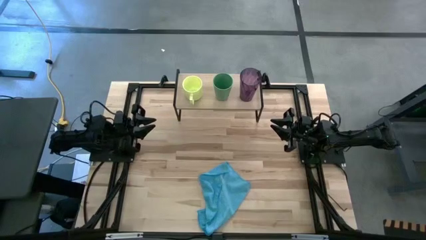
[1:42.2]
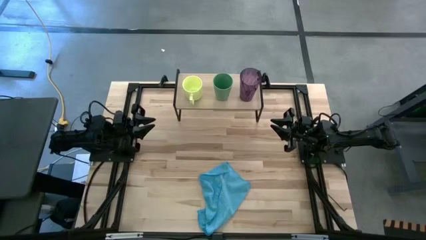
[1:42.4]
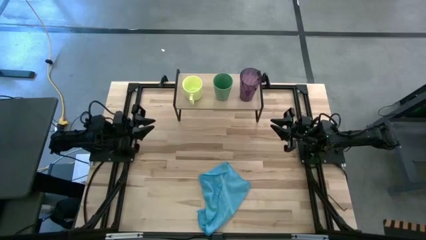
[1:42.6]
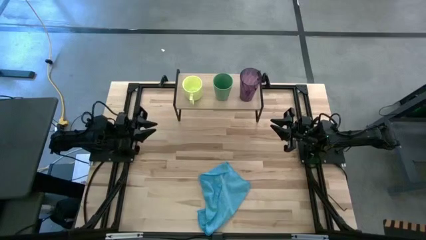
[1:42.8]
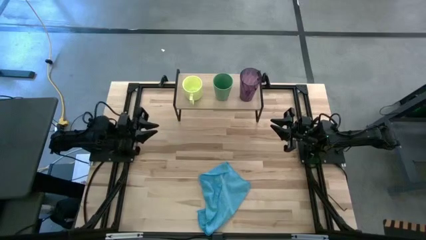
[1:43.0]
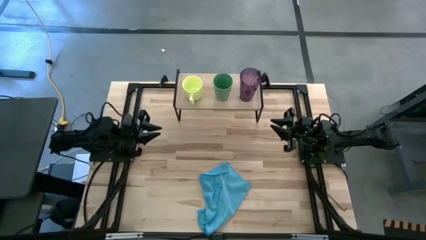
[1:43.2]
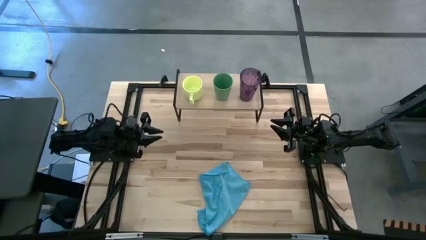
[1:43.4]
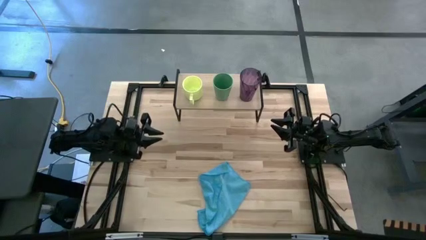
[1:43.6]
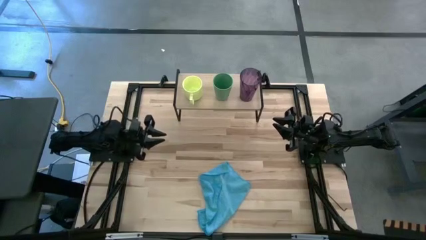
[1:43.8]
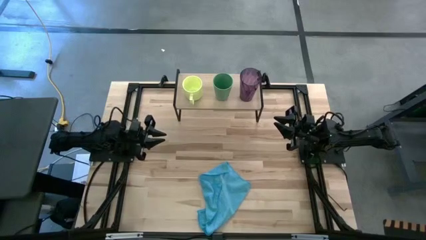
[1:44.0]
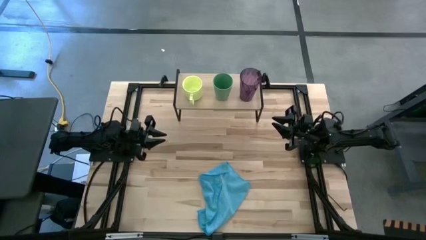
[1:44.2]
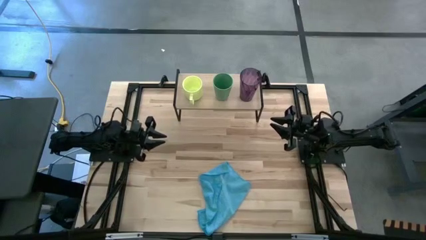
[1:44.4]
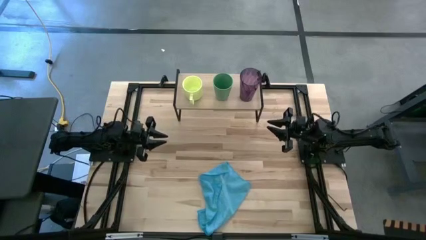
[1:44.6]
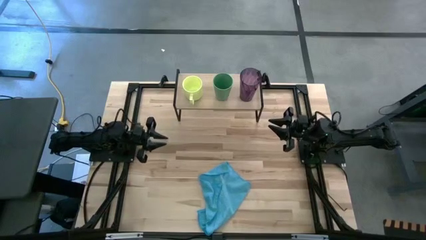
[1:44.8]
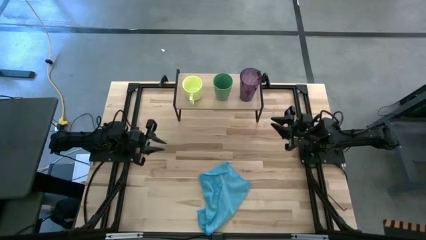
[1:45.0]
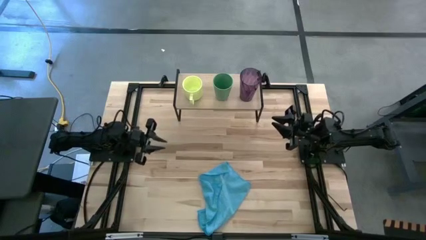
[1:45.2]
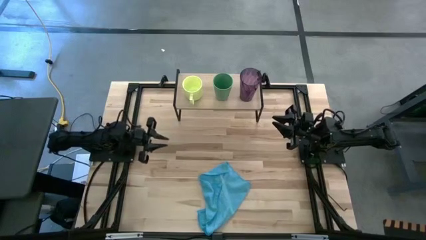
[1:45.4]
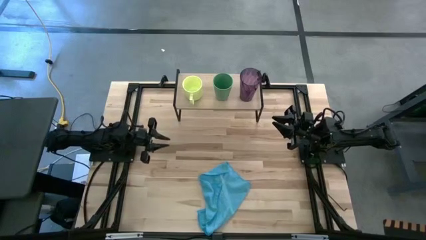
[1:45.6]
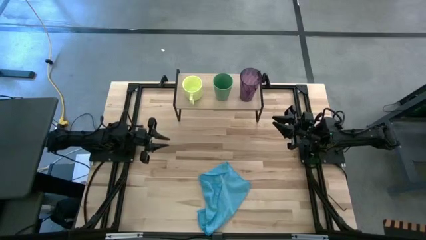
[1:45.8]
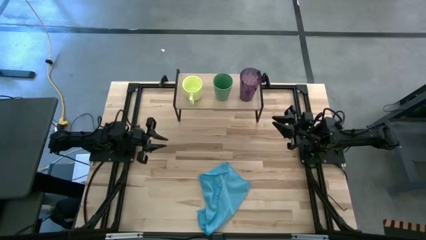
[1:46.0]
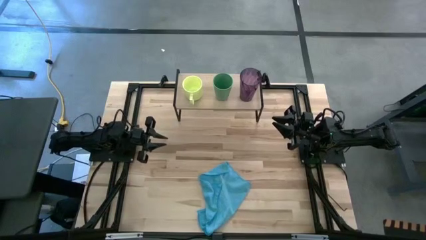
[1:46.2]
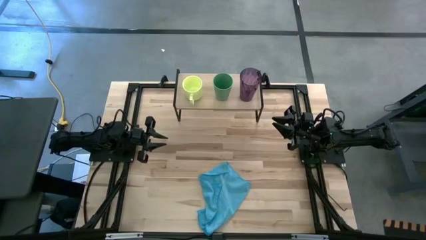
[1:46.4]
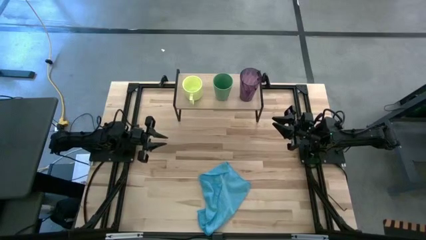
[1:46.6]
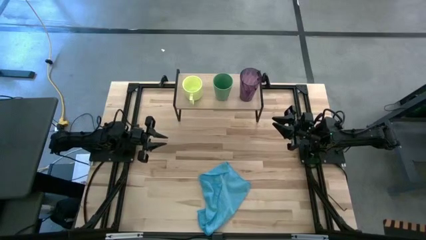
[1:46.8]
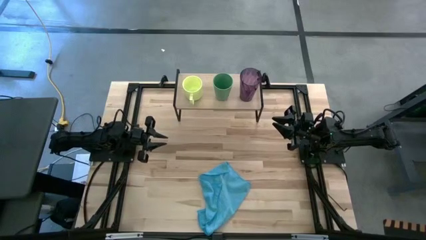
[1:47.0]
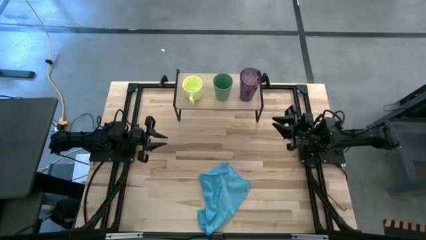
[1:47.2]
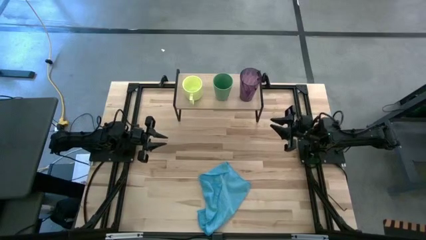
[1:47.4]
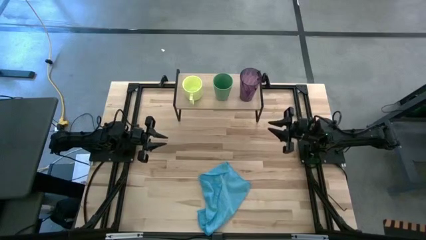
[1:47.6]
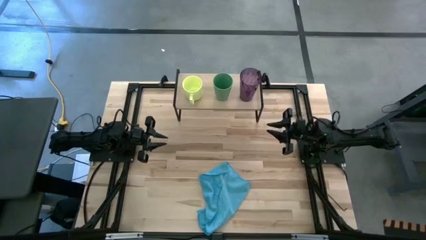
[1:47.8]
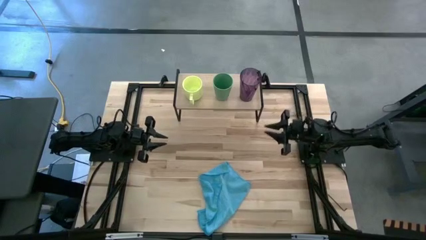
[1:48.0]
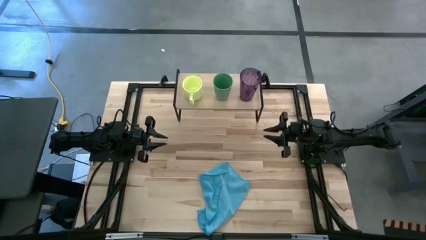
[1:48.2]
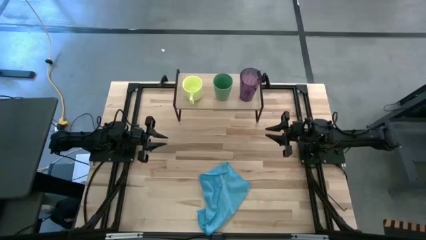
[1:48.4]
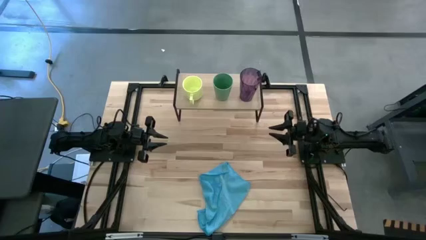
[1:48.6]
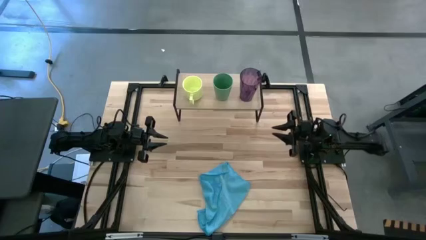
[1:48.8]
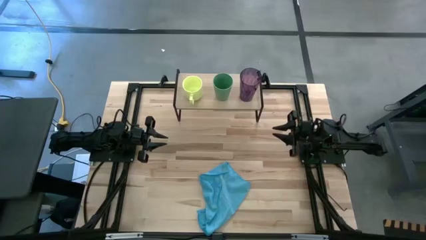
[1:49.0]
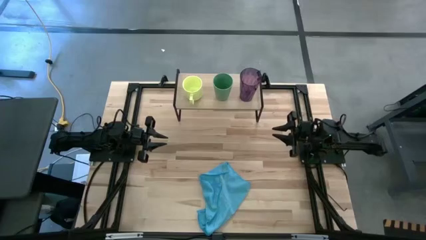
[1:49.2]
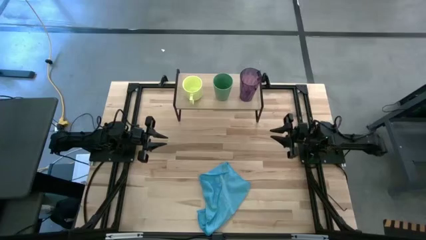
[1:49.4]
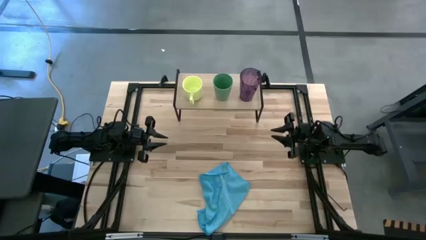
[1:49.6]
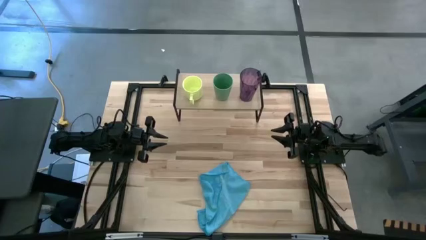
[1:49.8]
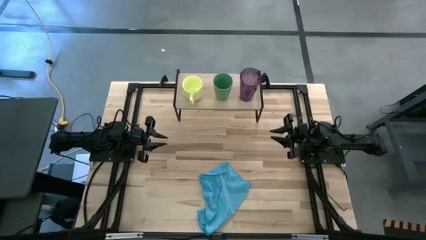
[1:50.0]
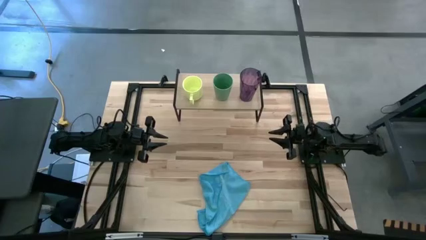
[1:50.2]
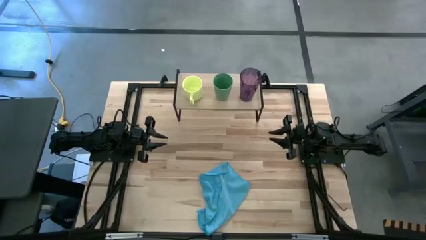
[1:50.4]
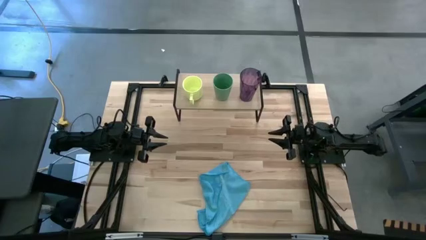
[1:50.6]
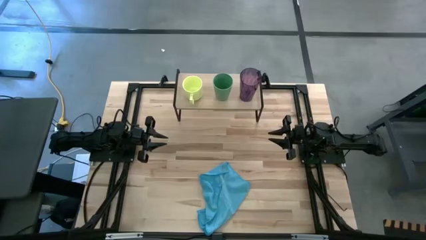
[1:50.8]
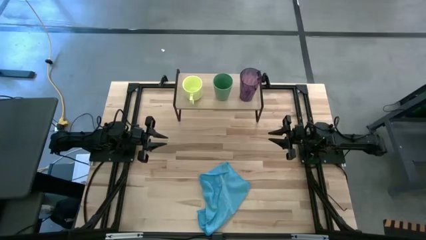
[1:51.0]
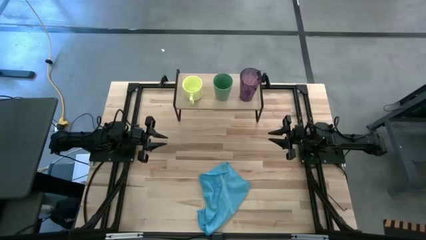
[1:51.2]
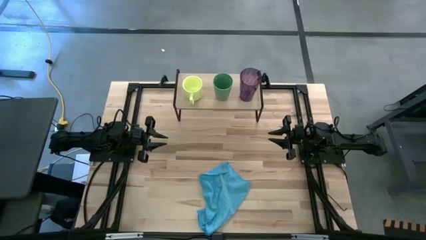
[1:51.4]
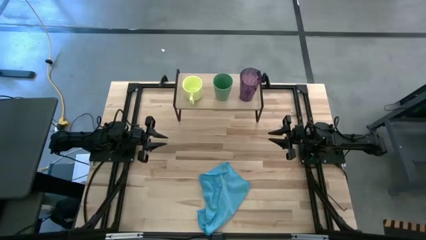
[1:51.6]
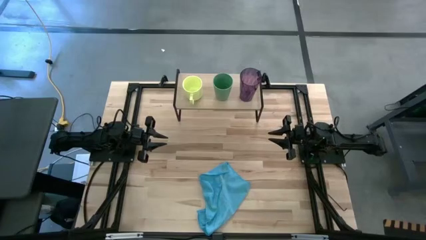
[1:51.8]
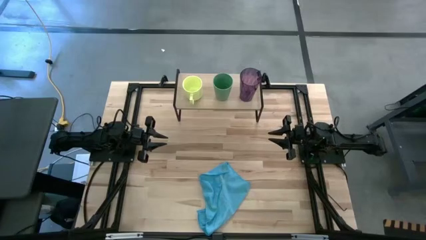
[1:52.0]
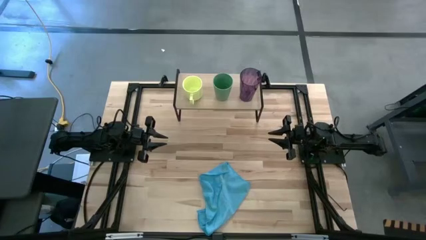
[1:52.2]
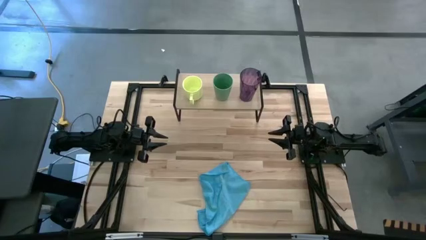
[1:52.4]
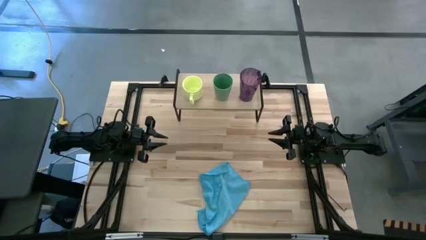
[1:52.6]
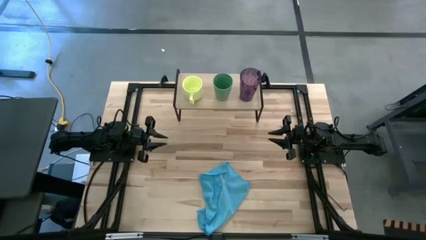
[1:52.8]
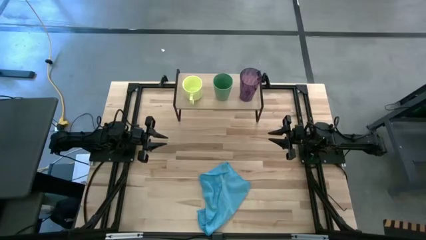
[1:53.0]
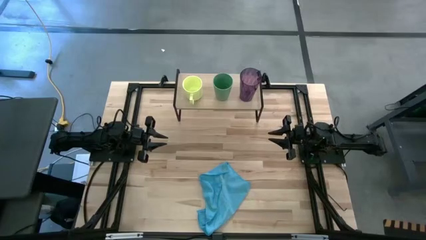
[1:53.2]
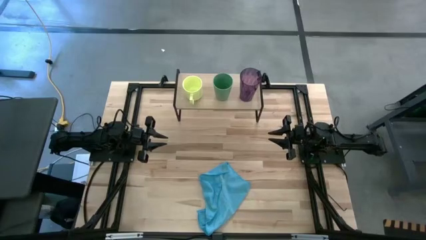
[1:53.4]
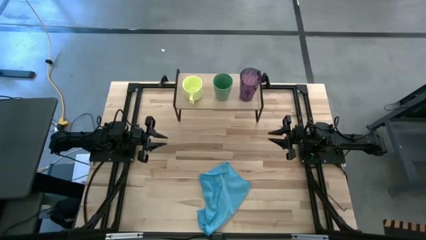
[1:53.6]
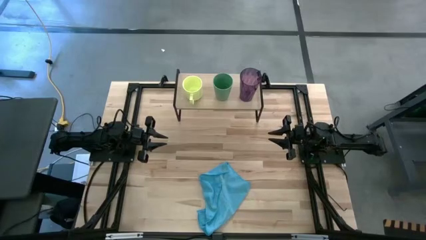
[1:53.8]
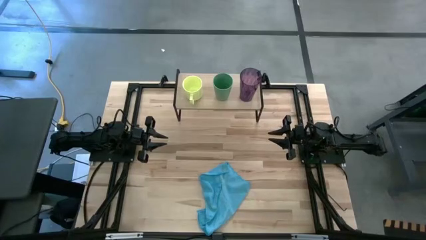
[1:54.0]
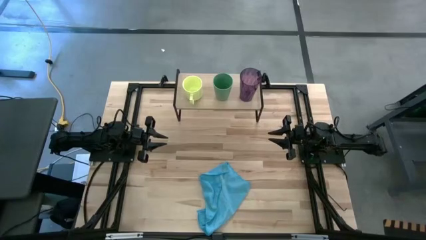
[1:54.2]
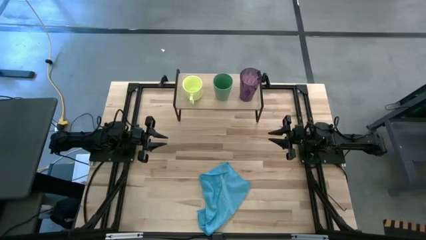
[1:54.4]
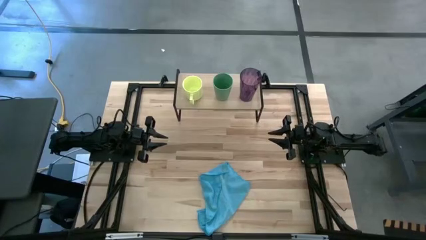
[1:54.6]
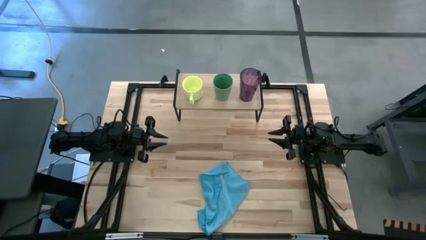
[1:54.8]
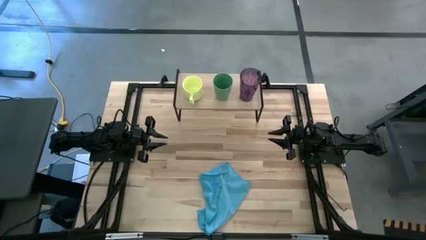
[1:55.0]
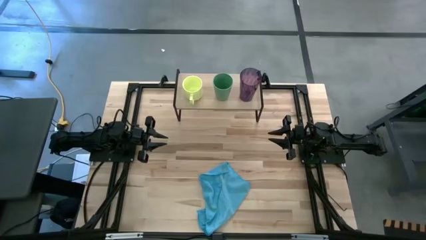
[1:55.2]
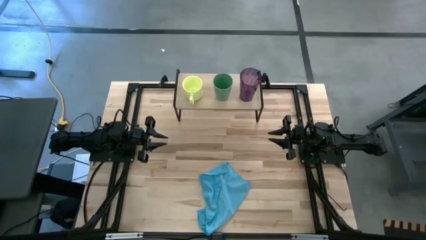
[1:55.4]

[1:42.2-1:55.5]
Task: Stack small to large cups/mugs on shelf
Return to Home Position
